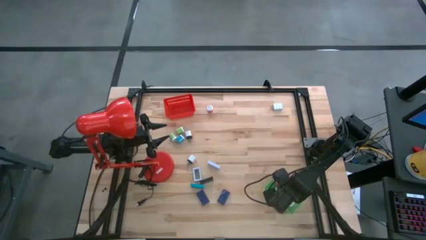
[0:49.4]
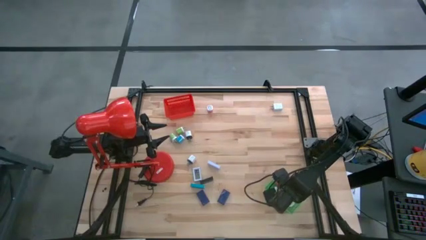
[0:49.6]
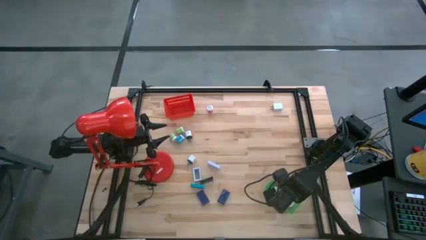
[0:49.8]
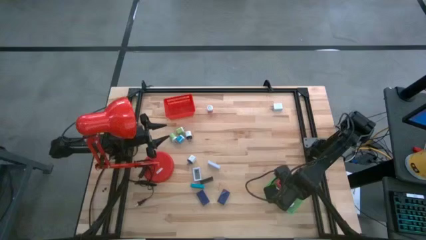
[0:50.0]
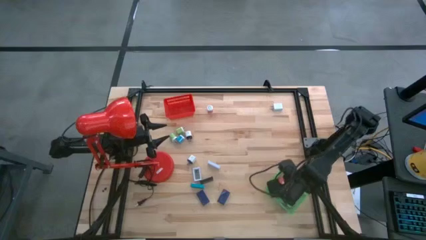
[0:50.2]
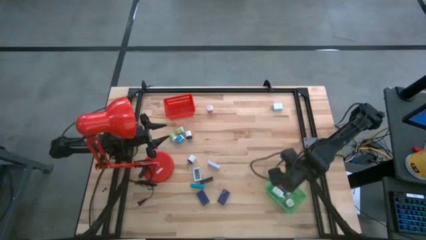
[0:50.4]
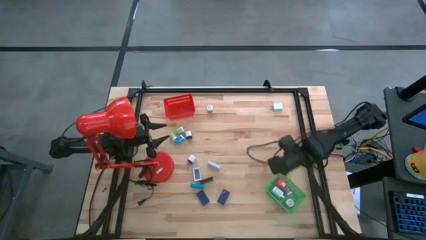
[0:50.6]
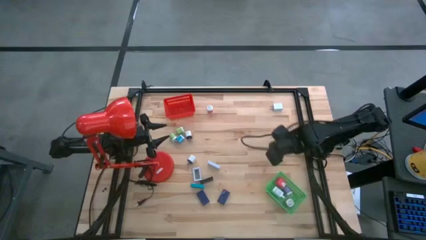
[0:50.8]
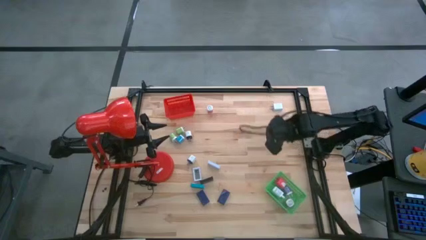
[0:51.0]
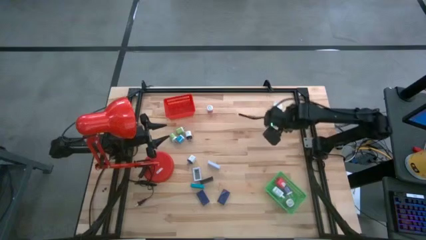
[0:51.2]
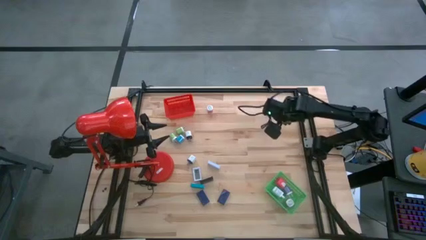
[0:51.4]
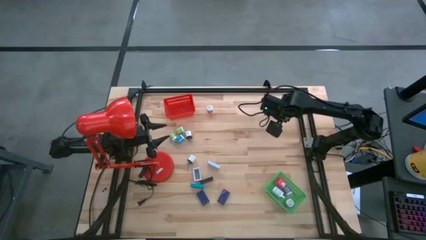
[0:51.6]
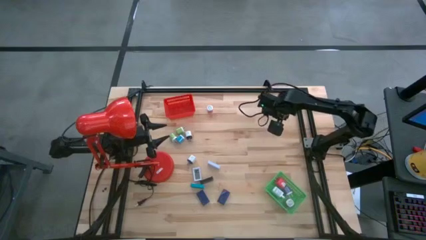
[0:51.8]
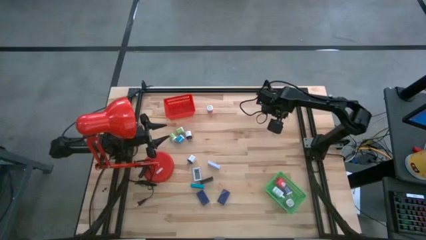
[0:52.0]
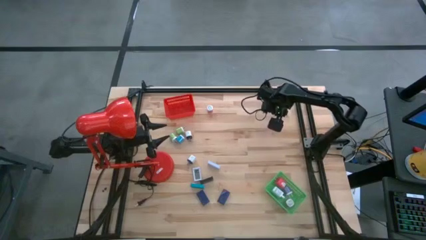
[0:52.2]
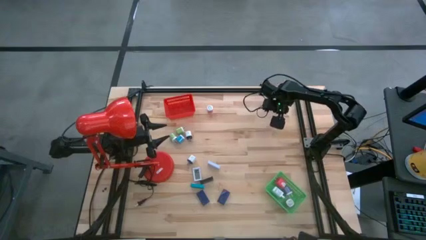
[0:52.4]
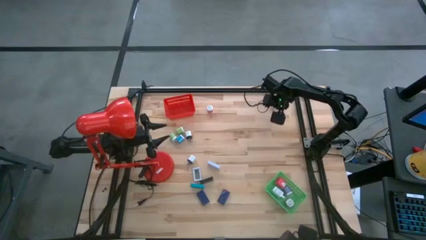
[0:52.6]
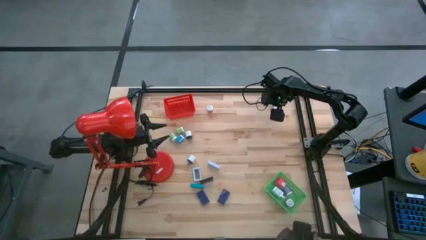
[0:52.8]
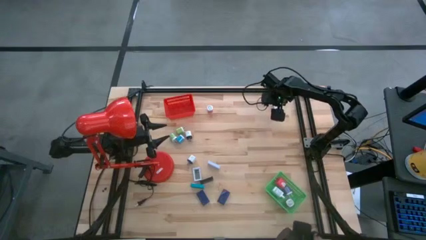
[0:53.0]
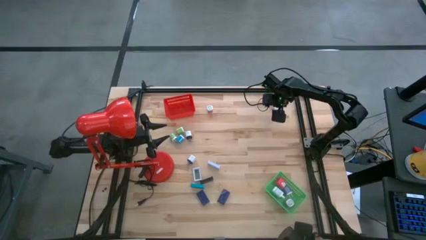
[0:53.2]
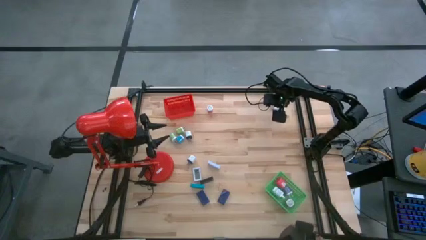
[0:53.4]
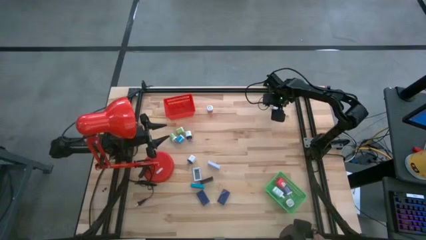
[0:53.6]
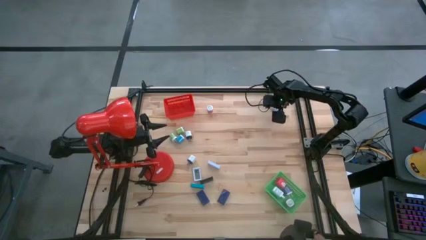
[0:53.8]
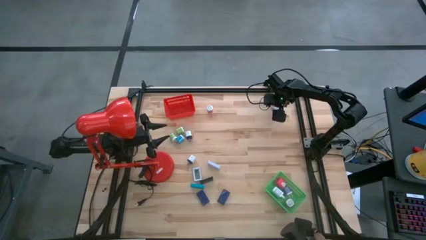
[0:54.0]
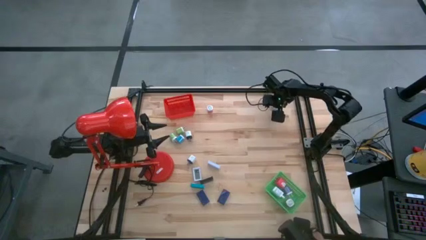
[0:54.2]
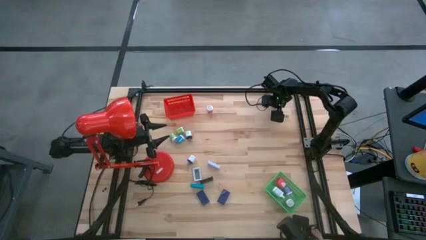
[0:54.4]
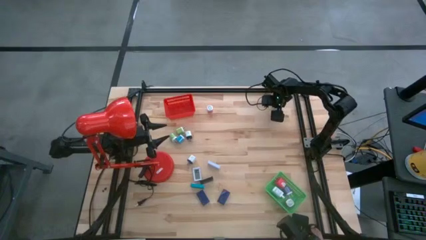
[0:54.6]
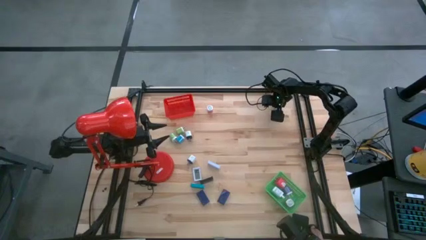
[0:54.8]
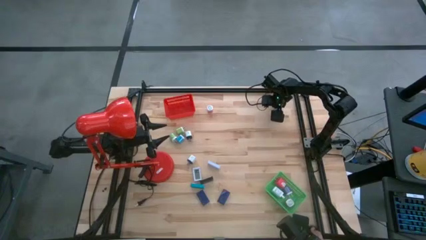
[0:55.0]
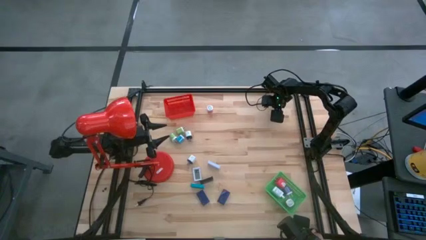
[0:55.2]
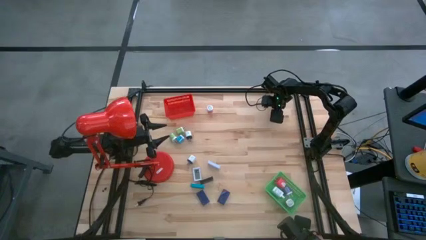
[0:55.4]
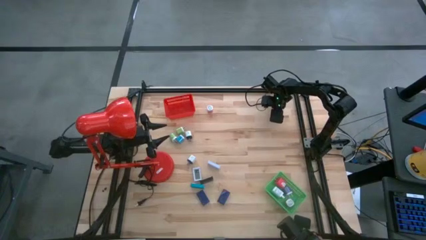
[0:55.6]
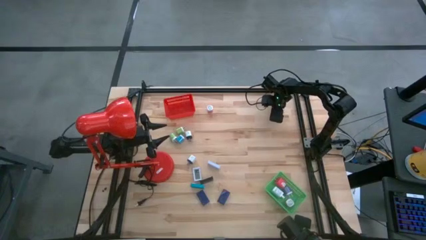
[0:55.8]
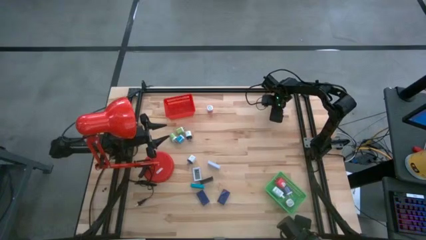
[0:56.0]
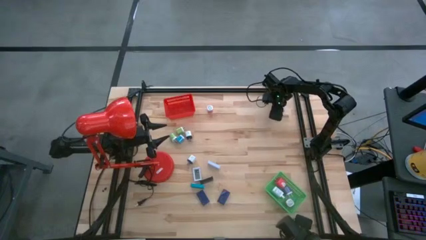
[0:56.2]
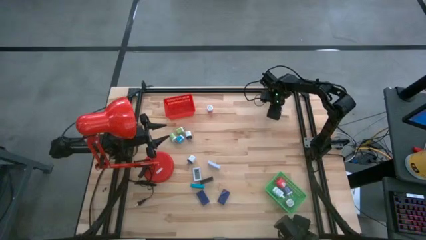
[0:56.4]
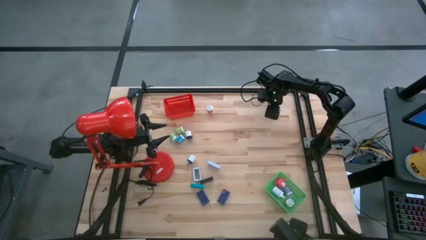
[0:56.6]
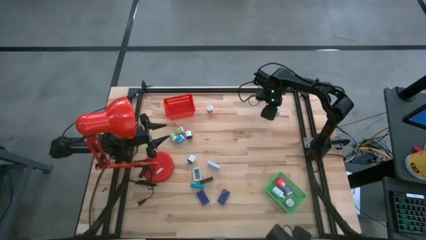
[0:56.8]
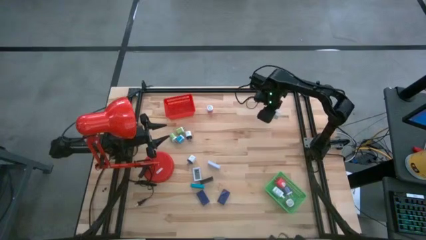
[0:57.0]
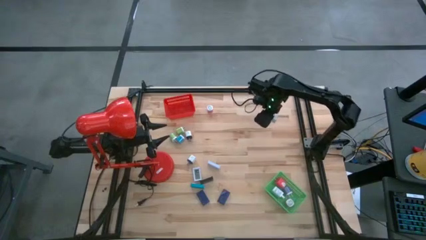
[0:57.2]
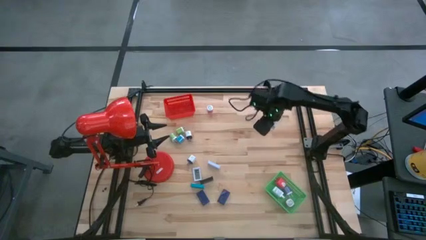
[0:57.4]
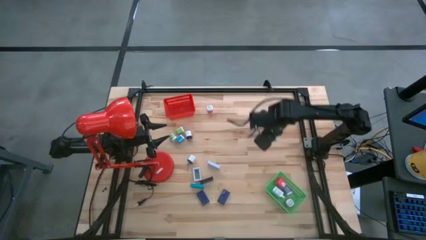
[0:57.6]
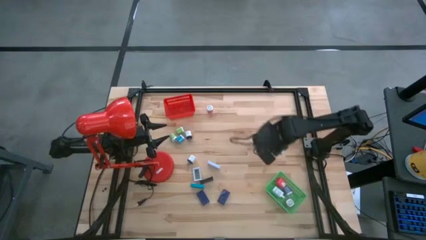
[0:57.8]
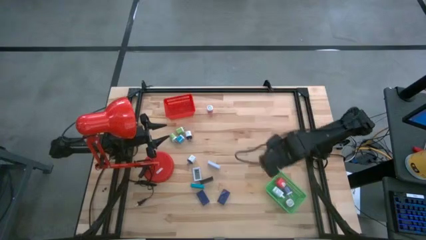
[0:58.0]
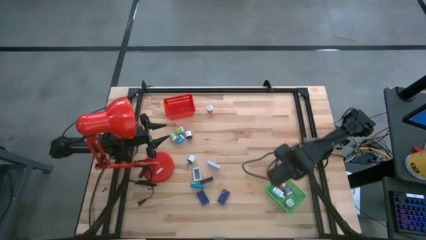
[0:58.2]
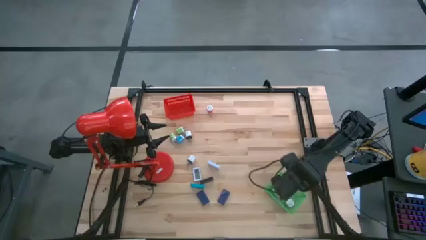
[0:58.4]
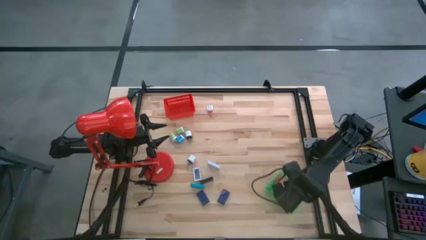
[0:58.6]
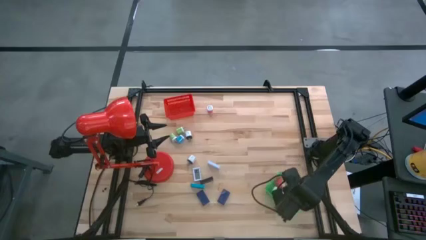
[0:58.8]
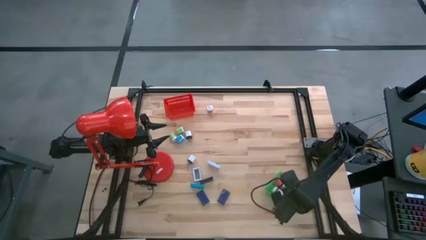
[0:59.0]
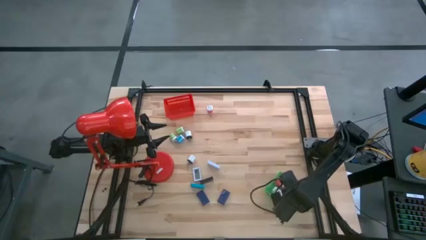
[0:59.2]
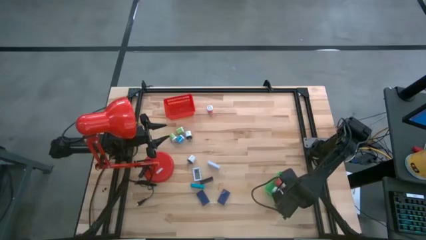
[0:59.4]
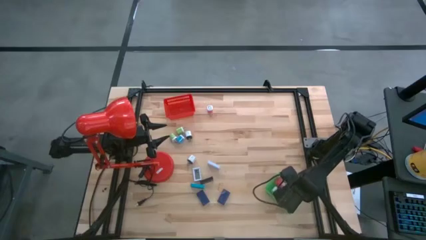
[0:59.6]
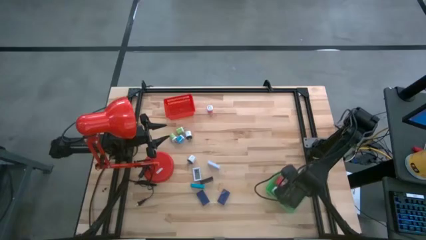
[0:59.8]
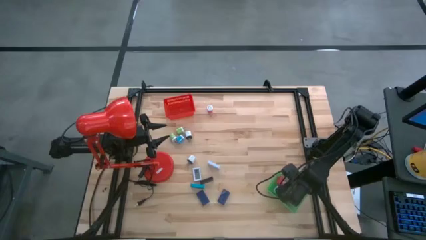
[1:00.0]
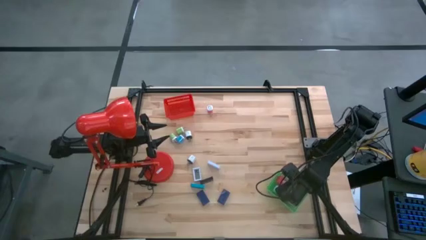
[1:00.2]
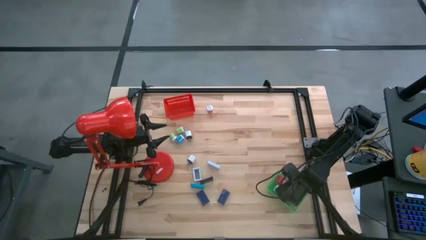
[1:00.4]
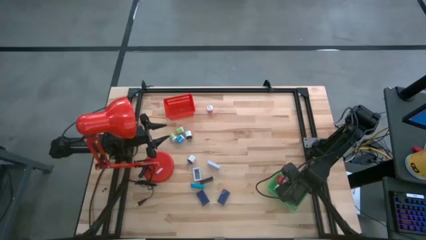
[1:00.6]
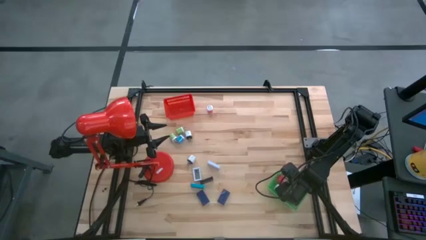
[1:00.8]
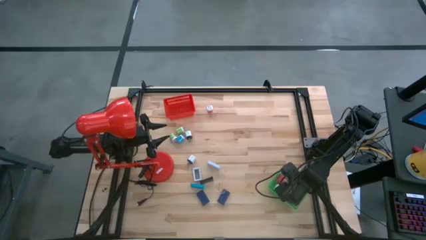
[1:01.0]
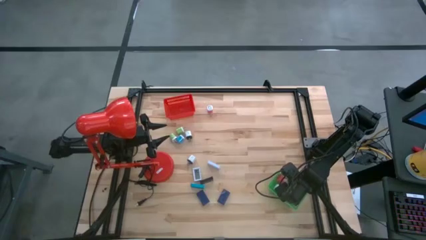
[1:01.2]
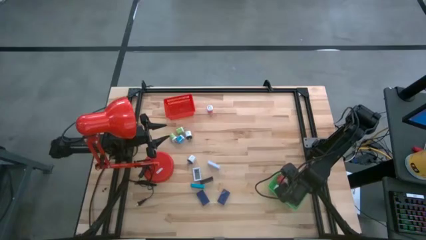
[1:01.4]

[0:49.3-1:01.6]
Task: Pick & Place Office items
Put the white charger adapter into the green bin
